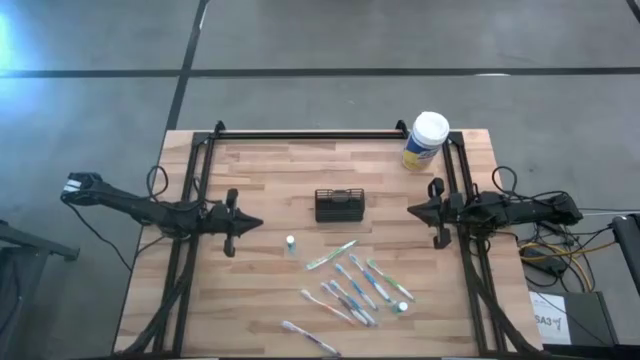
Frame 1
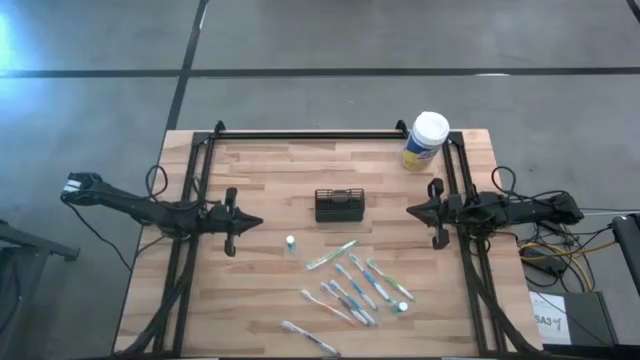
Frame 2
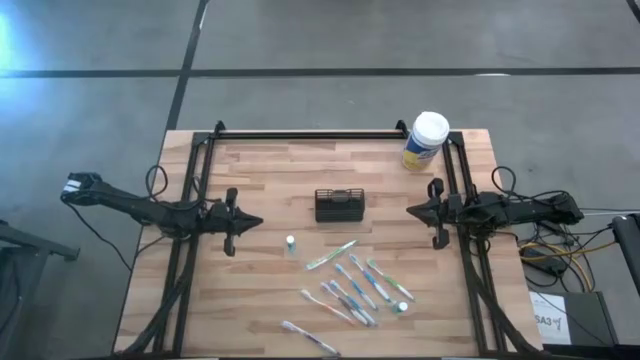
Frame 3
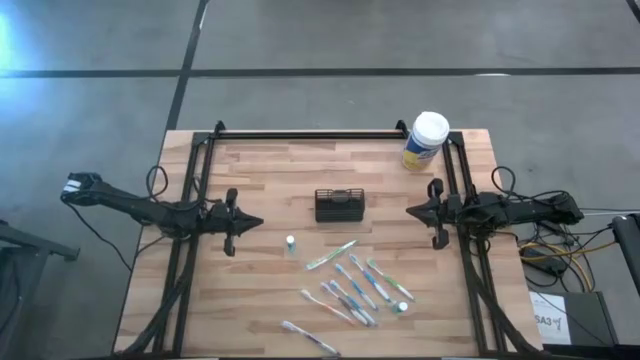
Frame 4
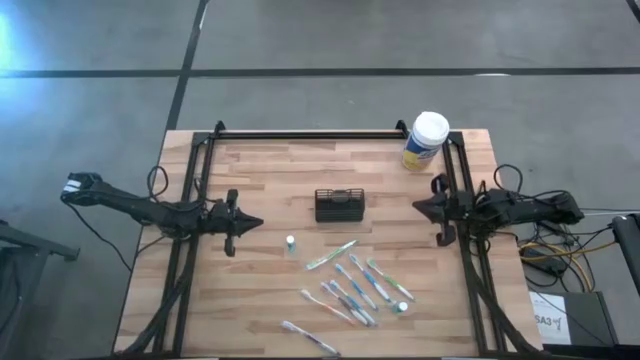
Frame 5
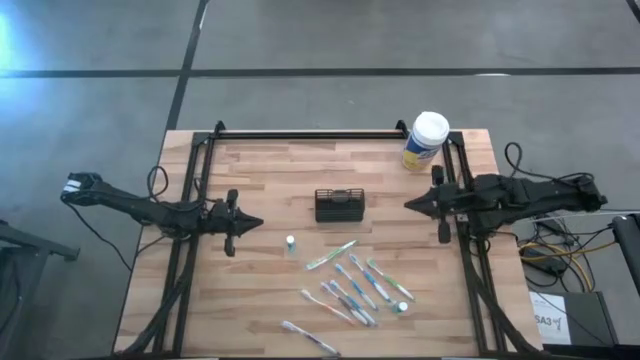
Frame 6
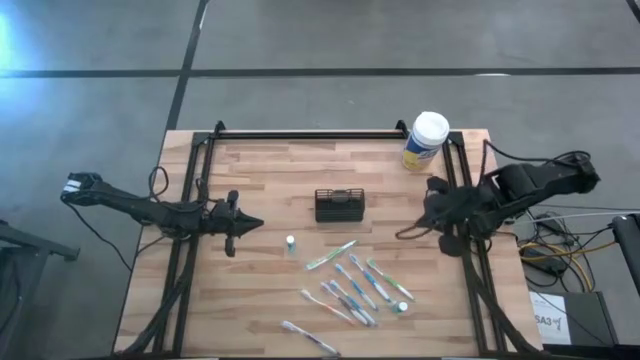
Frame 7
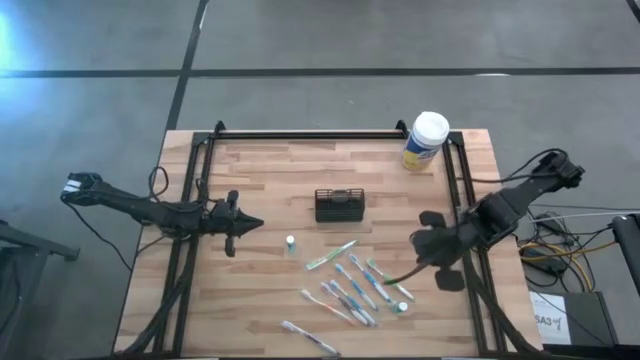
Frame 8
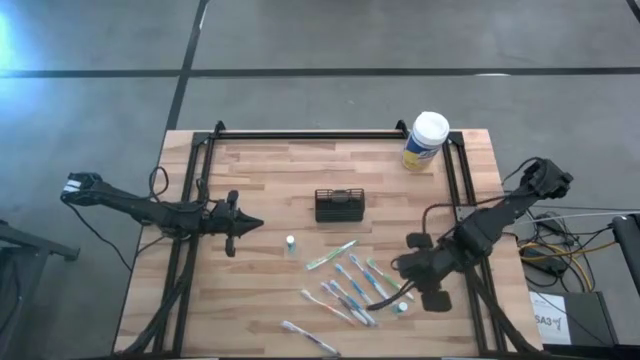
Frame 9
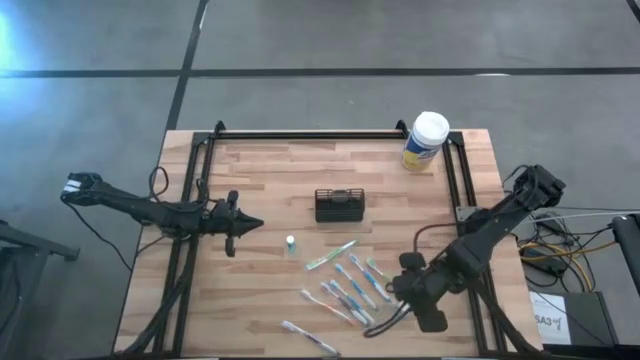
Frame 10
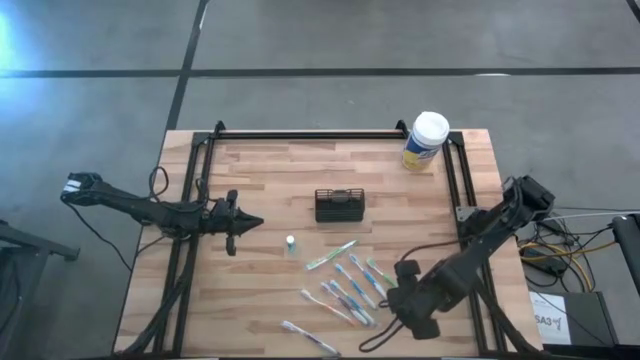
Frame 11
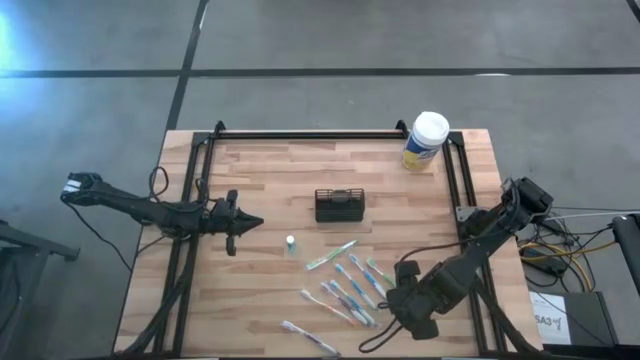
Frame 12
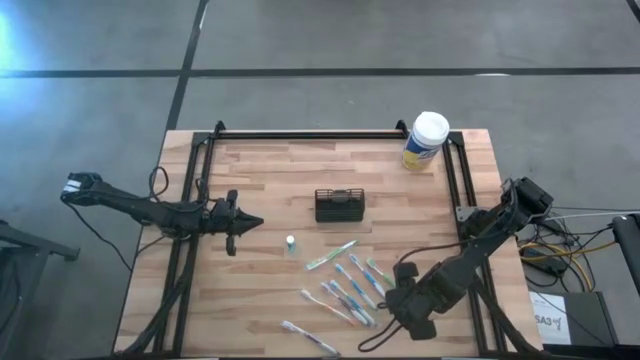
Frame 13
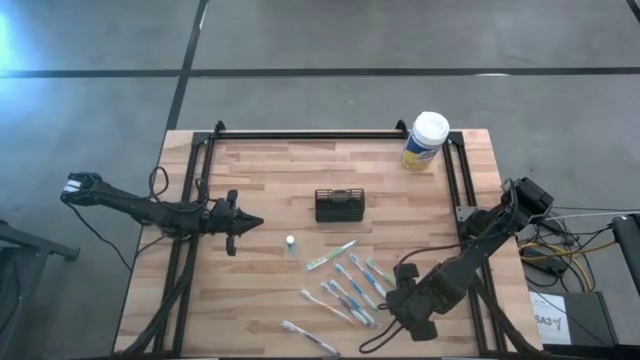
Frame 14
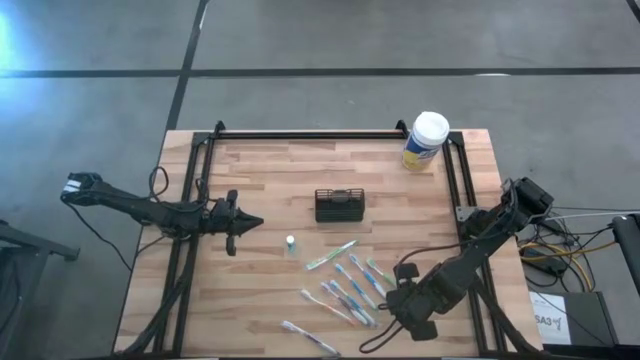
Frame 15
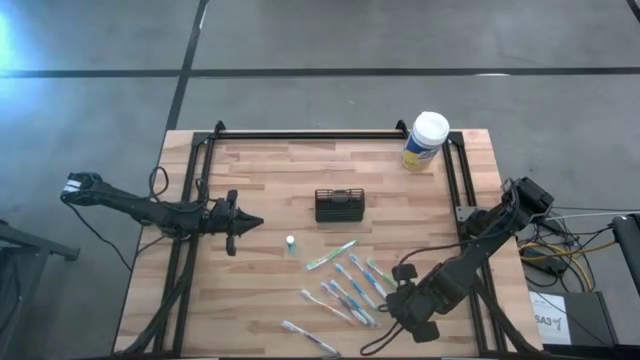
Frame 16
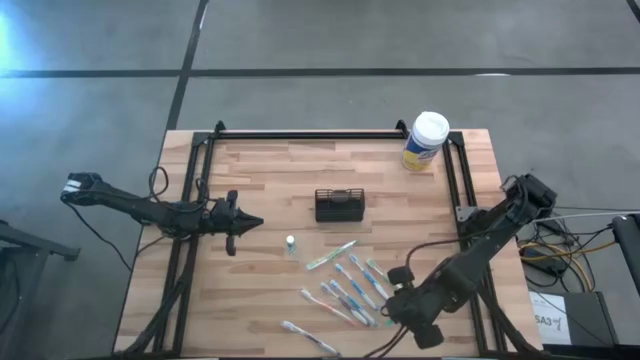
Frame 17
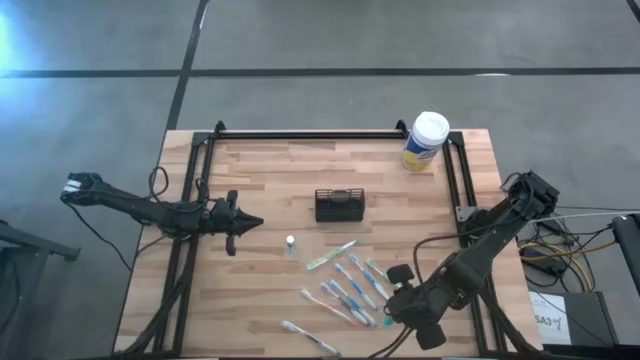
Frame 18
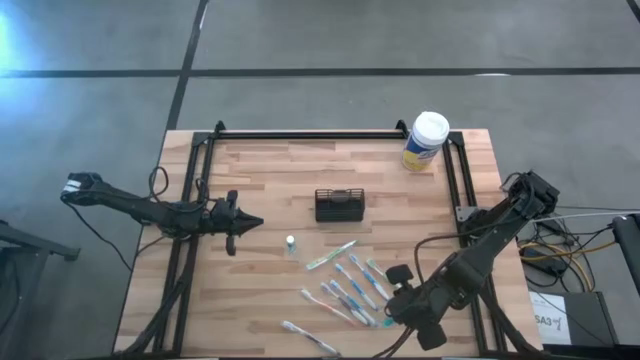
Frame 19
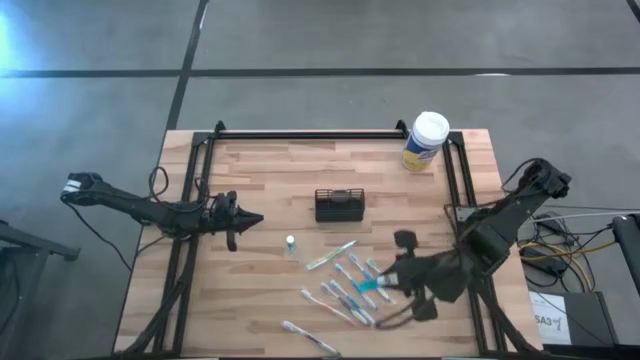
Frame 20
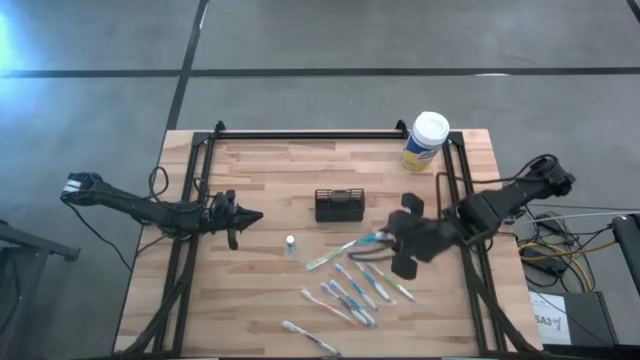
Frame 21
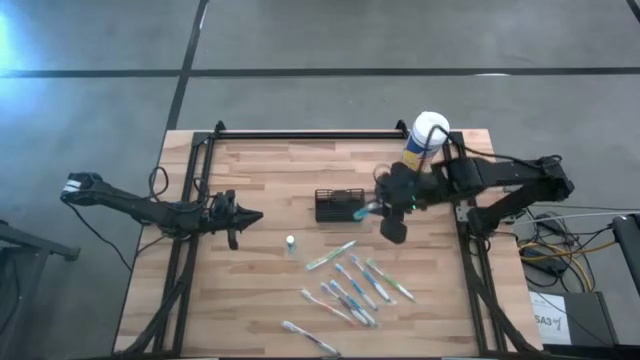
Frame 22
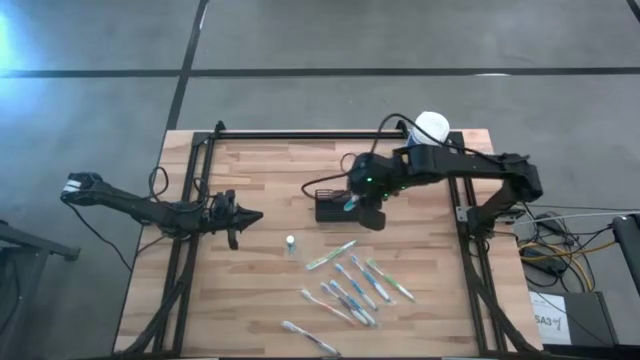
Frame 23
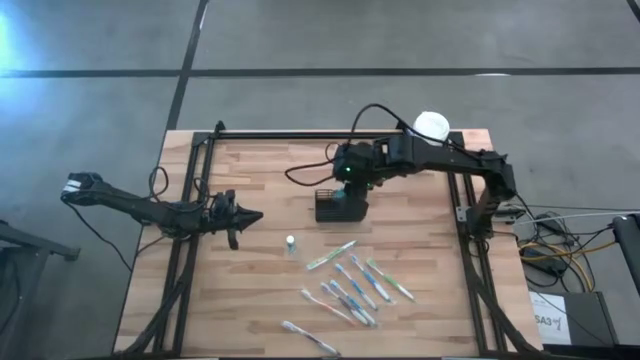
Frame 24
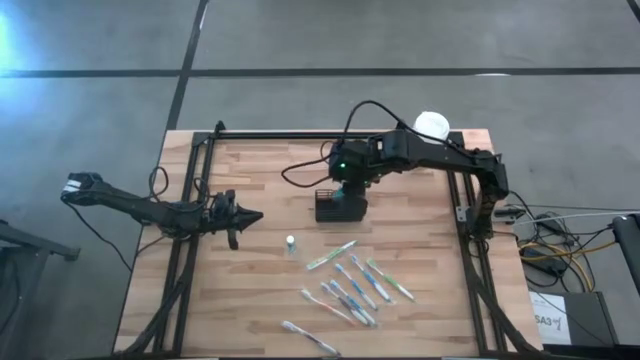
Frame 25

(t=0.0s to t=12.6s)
Task: Pick & Place toothbrushing station
Put the bottom blue mouthwash into the black wire organizer
